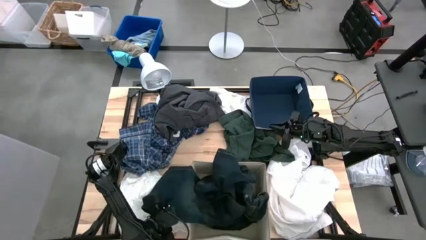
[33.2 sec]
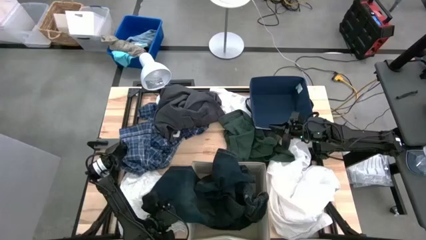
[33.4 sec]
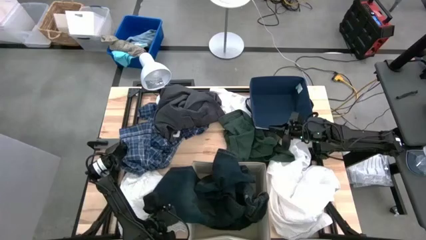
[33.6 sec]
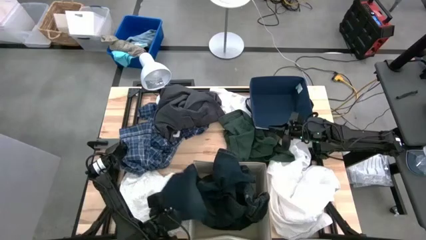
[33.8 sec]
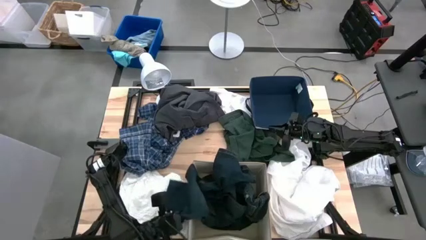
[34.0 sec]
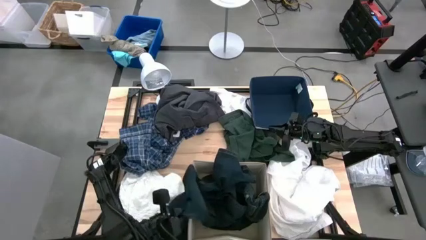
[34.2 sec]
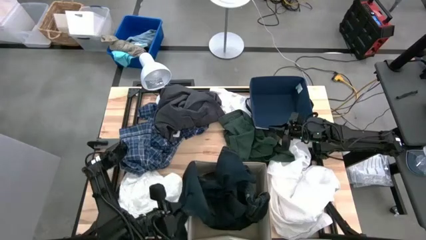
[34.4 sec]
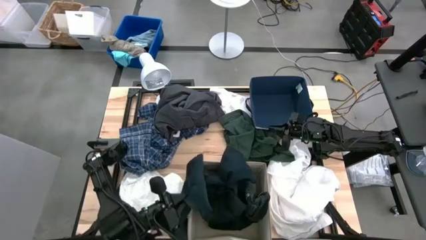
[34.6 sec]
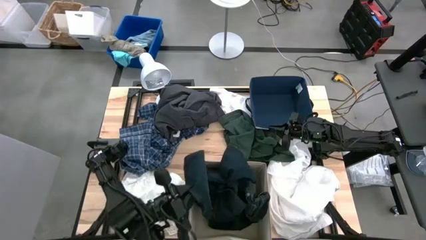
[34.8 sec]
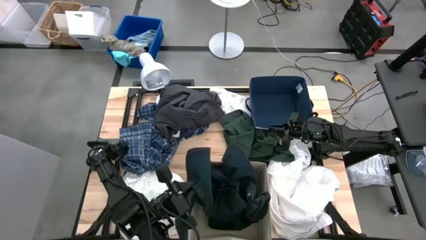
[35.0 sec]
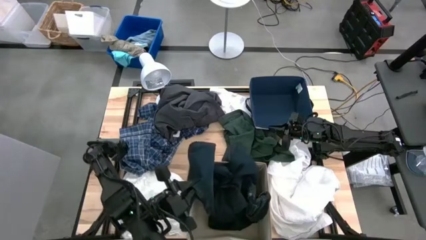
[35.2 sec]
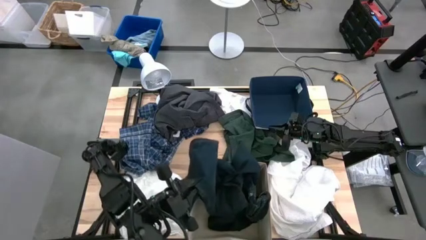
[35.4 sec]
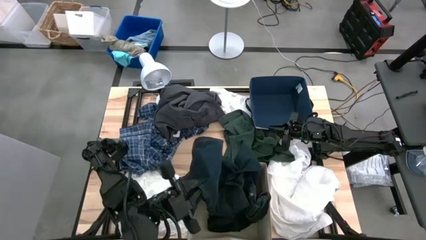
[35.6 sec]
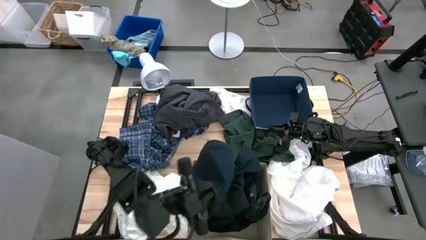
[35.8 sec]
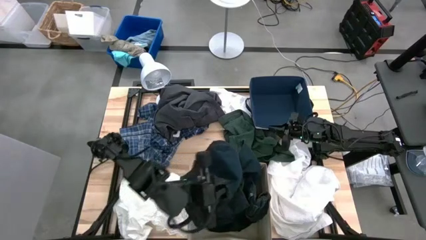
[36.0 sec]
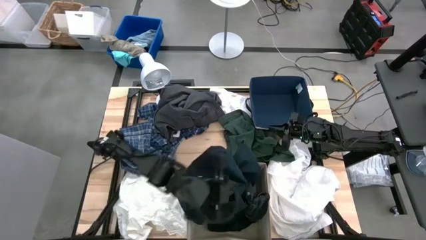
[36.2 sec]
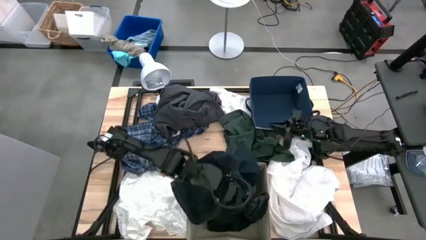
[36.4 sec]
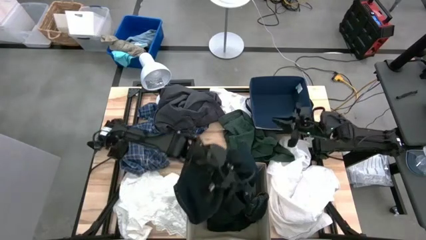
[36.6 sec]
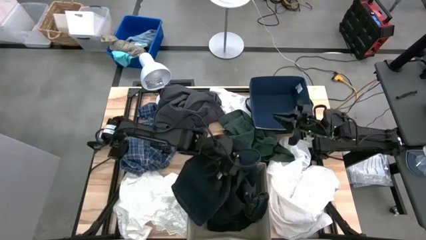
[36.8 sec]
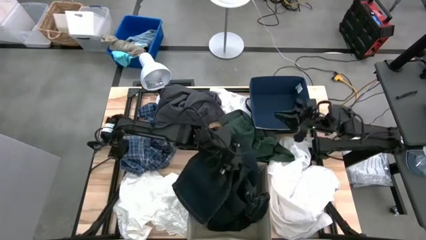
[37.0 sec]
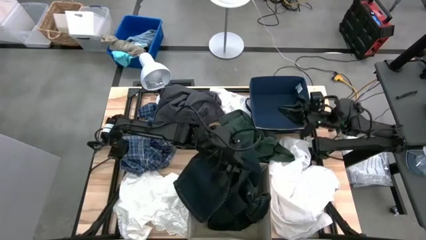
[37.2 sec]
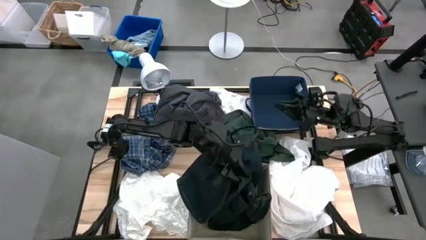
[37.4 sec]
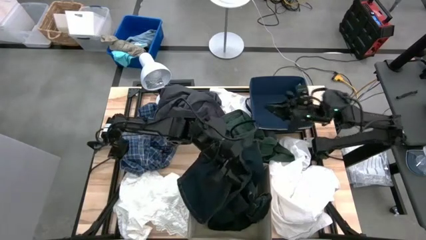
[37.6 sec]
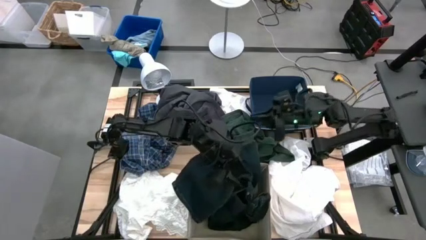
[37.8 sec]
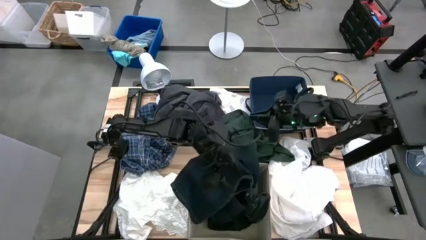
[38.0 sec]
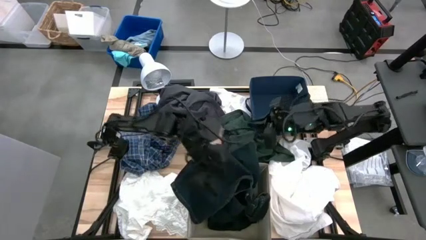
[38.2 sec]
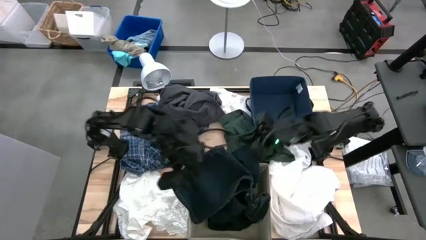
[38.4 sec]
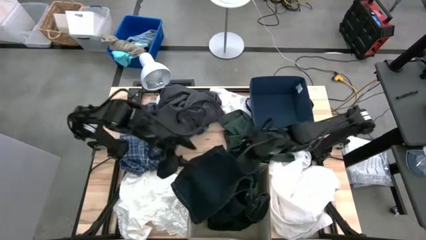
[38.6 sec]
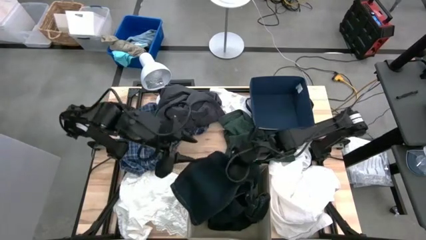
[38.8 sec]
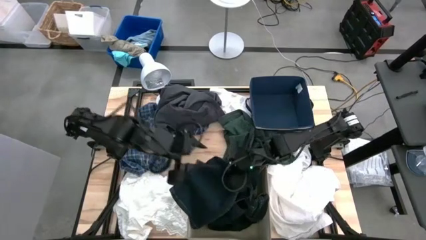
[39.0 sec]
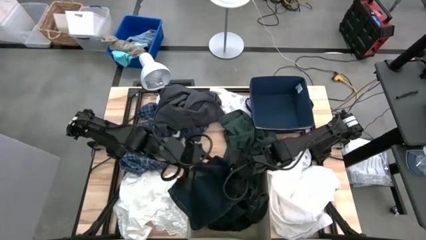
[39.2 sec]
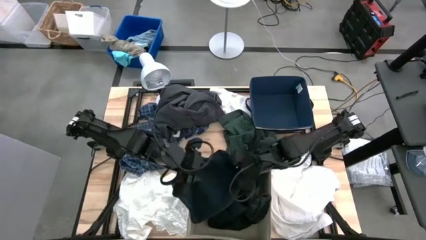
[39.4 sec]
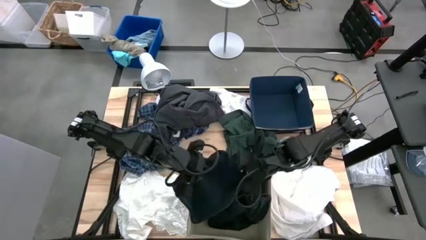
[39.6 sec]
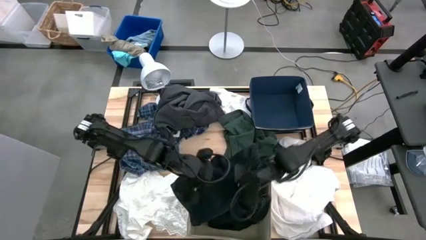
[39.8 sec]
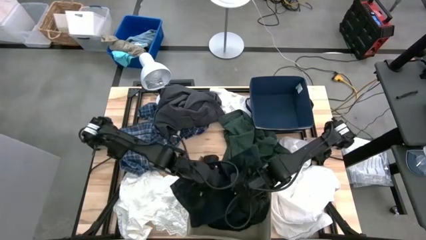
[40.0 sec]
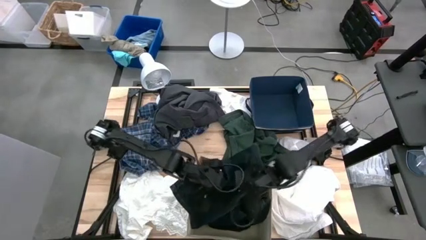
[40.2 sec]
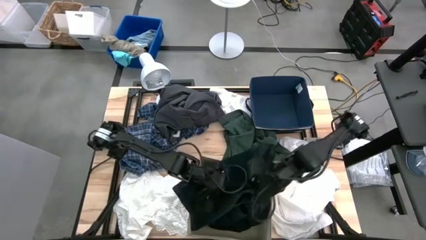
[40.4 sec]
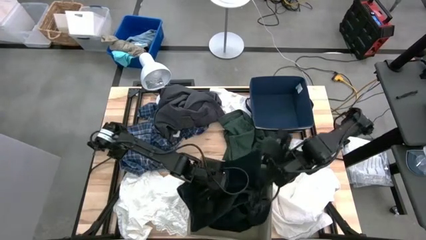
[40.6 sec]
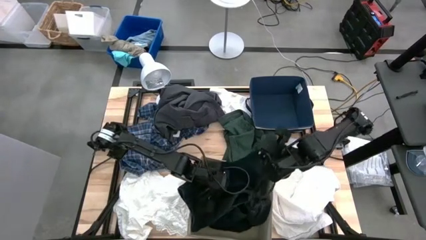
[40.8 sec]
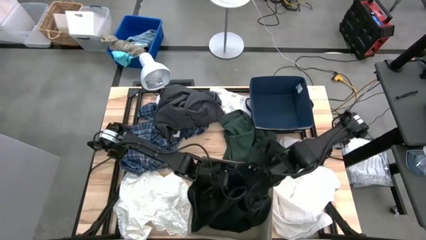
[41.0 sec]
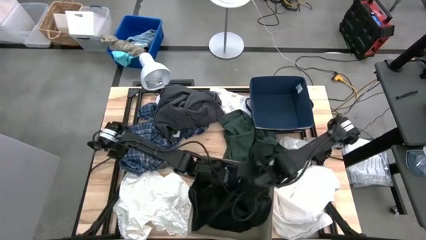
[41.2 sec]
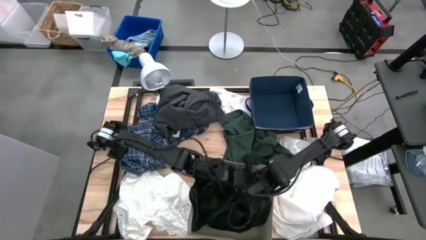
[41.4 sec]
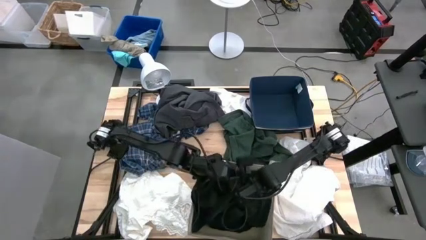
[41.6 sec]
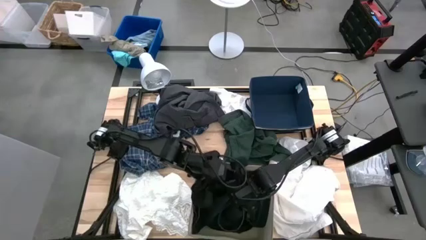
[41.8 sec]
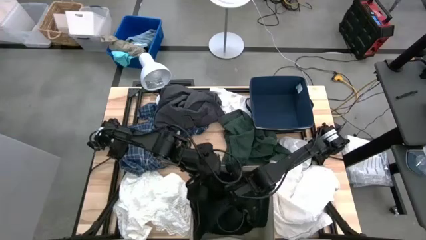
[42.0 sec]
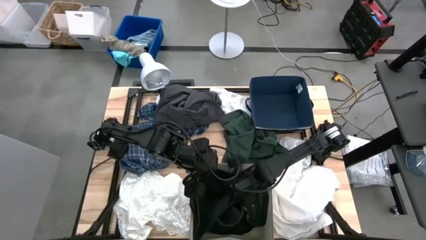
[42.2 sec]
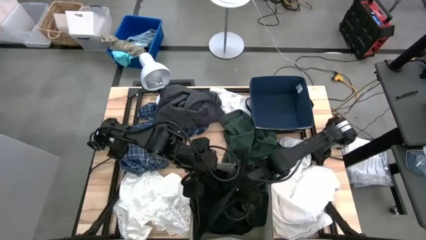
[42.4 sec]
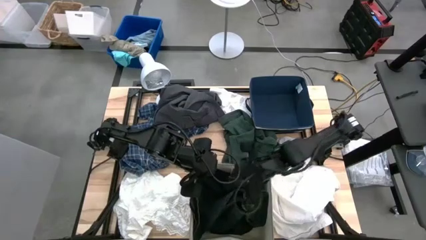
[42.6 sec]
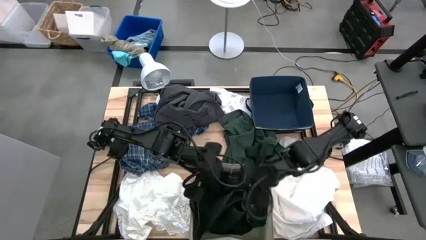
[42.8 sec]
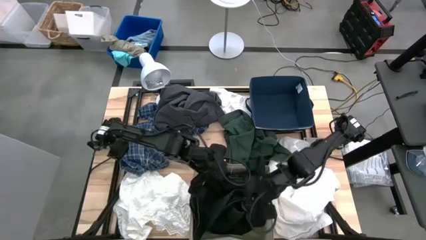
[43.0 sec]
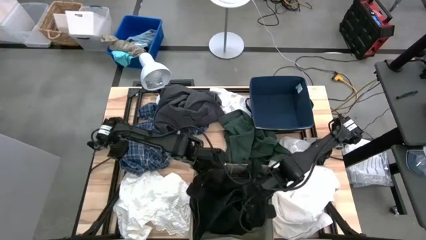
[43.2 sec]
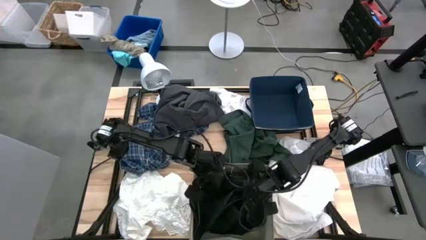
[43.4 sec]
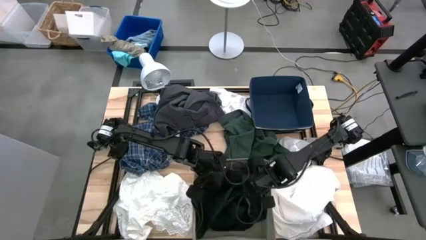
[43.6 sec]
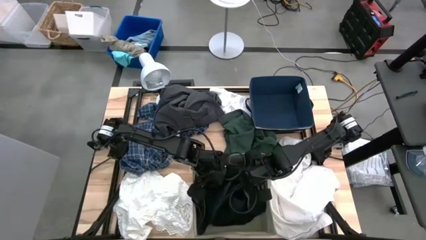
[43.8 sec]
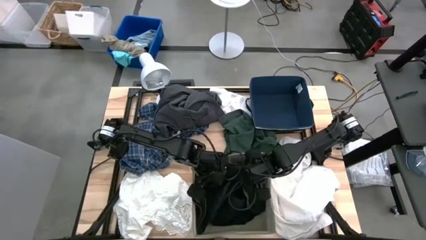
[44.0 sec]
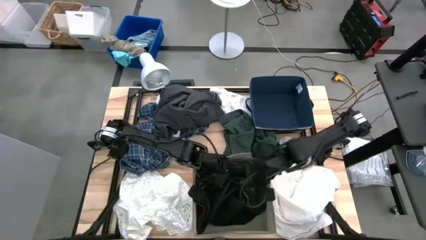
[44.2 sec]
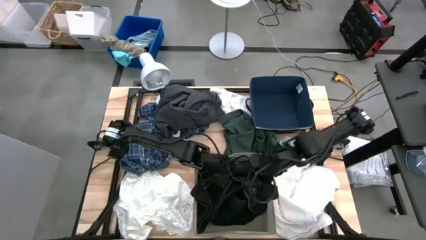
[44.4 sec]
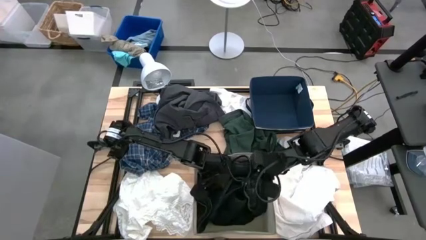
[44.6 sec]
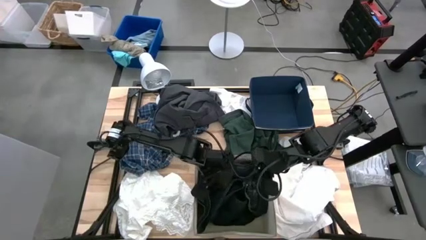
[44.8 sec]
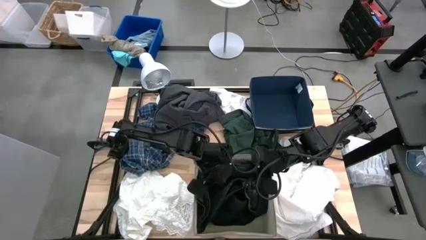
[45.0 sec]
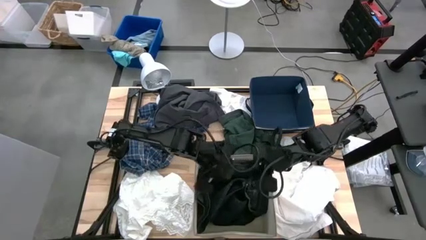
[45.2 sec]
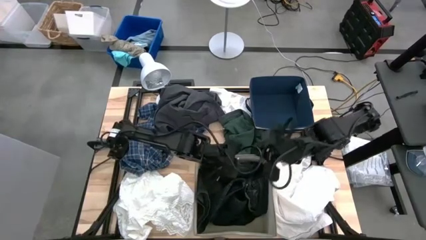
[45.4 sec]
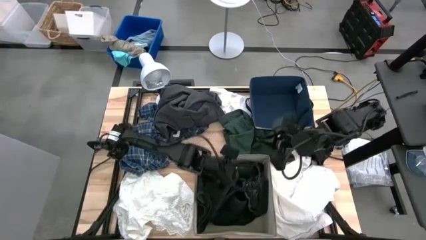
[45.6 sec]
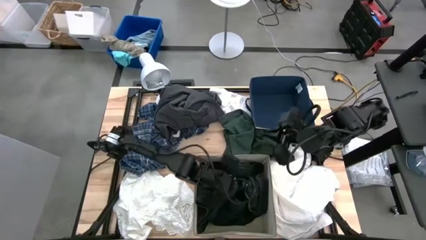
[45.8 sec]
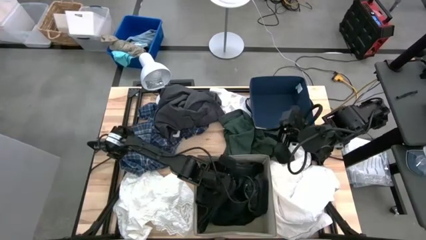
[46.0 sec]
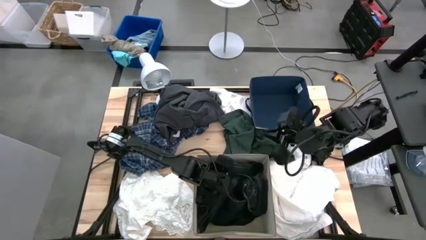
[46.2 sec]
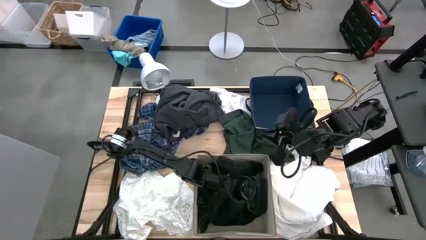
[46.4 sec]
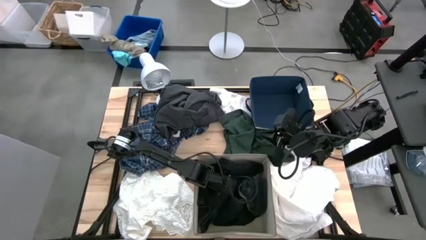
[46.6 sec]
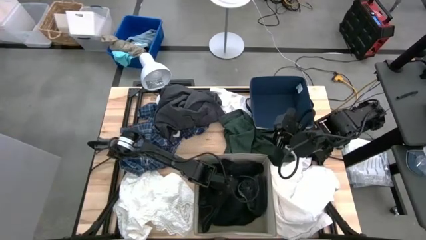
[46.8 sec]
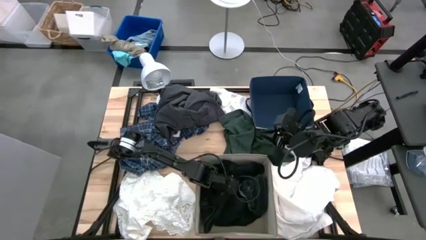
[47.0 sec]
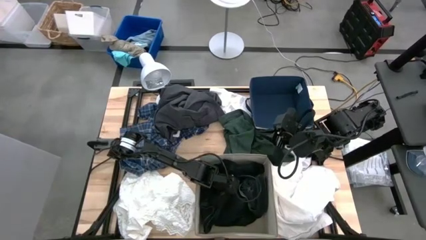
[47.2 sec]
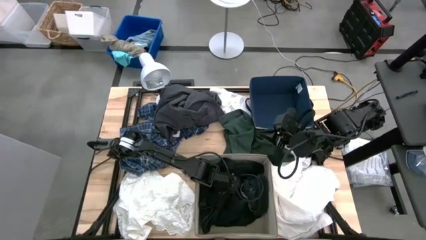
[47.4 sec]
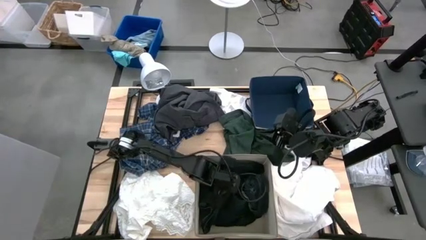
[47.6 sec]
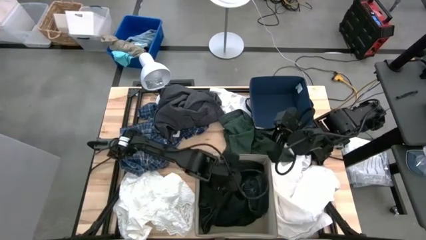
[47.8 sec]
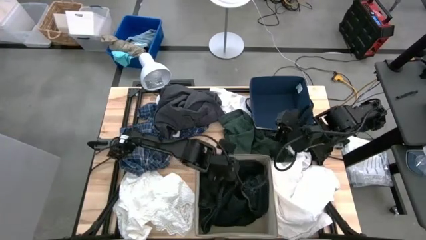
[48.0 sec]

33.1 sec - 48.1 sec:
Task: Sort clothes
Put the dark blue pants into the brown laundry organizer
